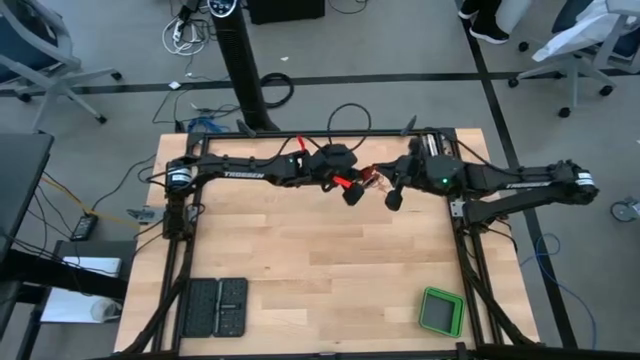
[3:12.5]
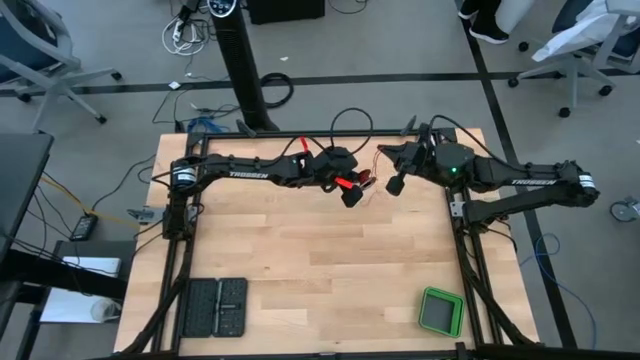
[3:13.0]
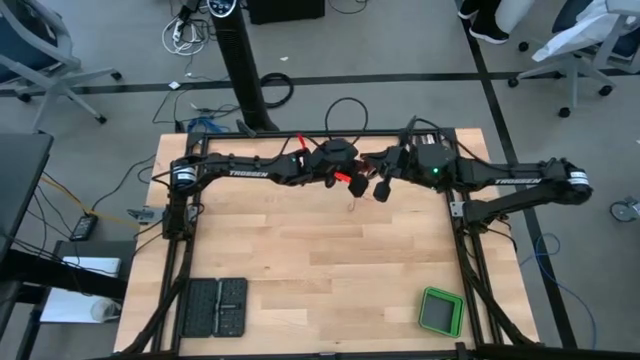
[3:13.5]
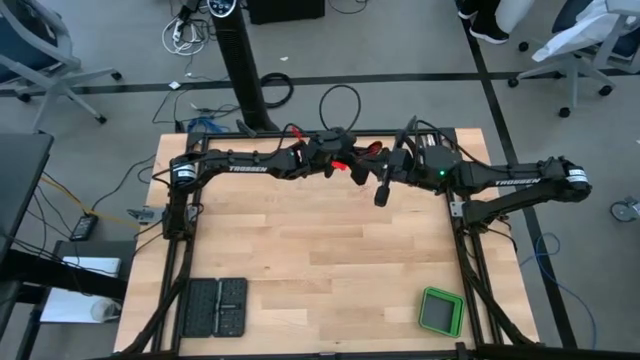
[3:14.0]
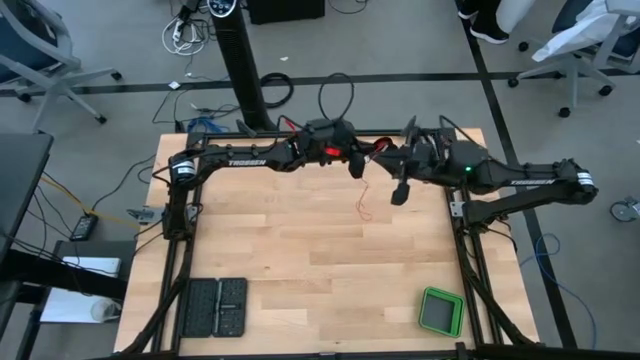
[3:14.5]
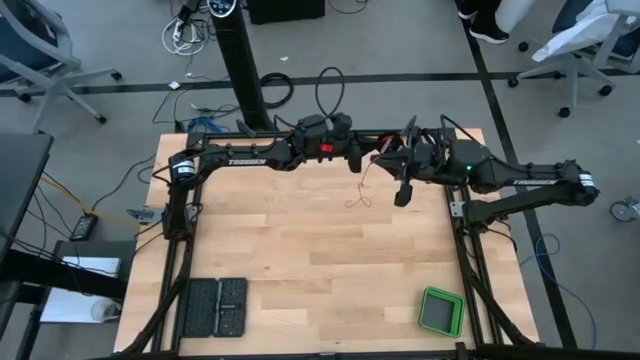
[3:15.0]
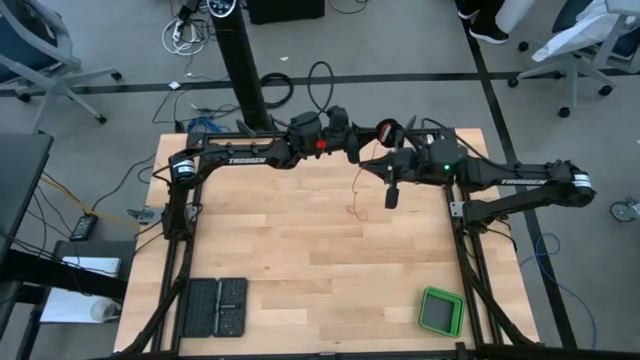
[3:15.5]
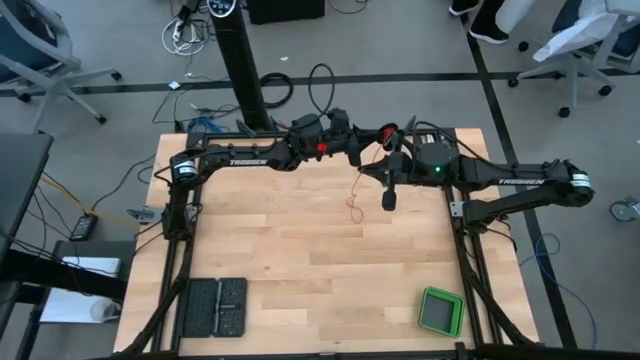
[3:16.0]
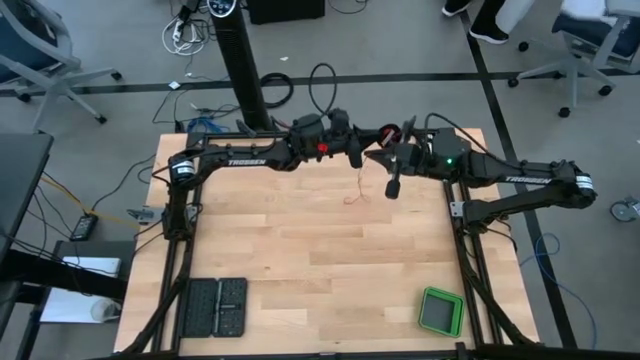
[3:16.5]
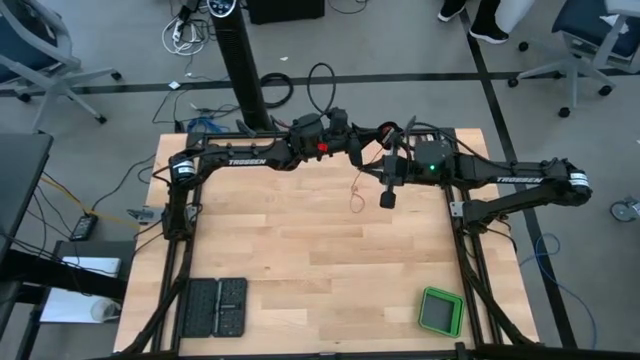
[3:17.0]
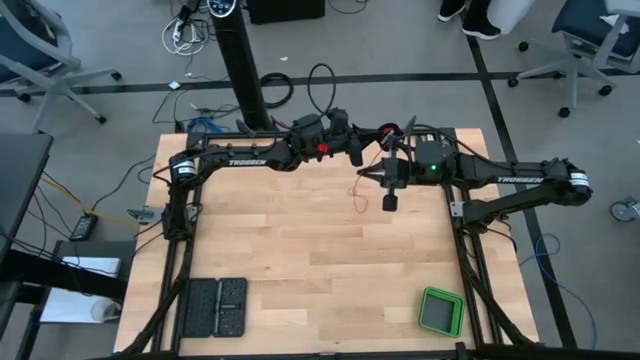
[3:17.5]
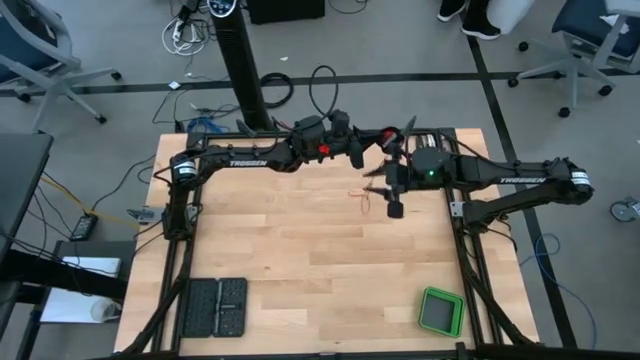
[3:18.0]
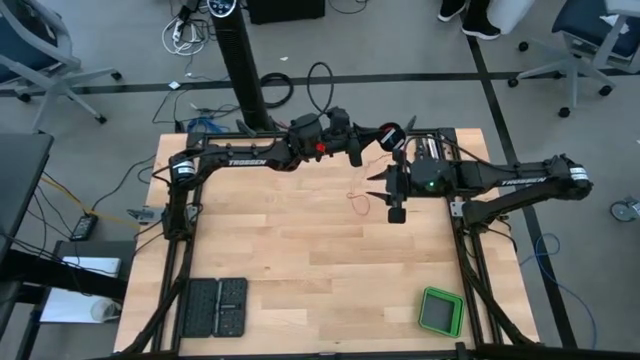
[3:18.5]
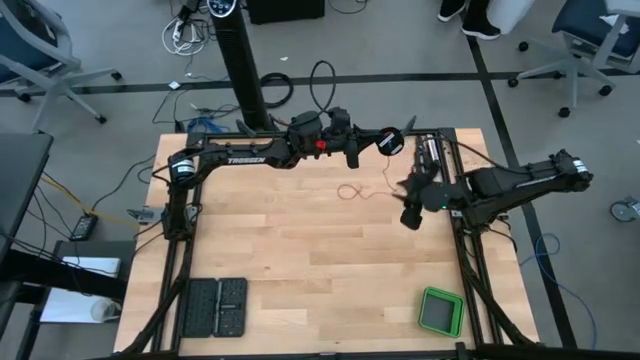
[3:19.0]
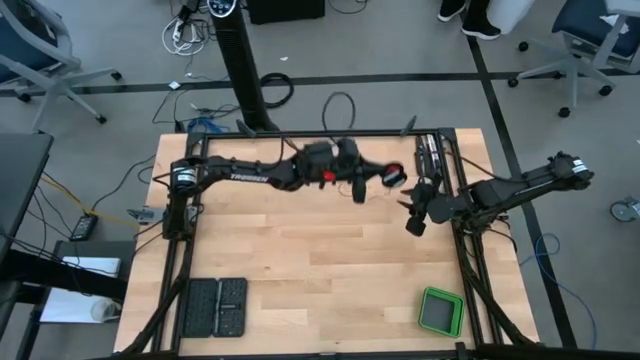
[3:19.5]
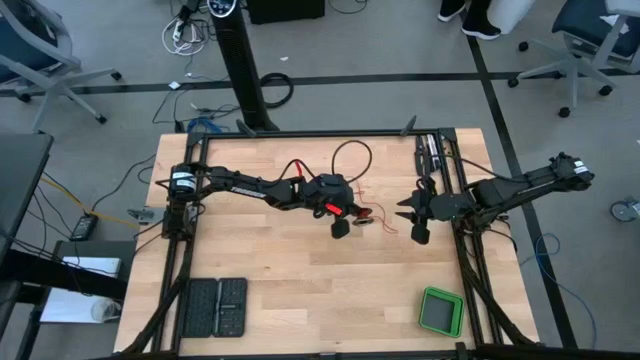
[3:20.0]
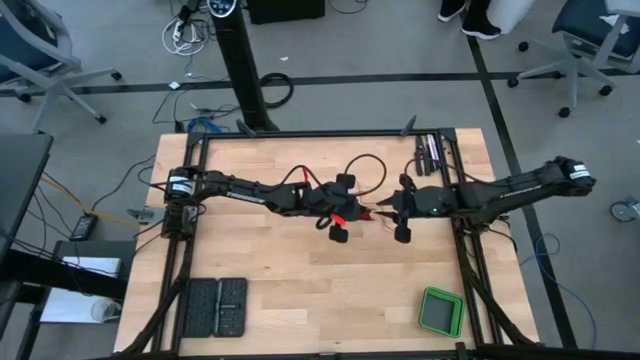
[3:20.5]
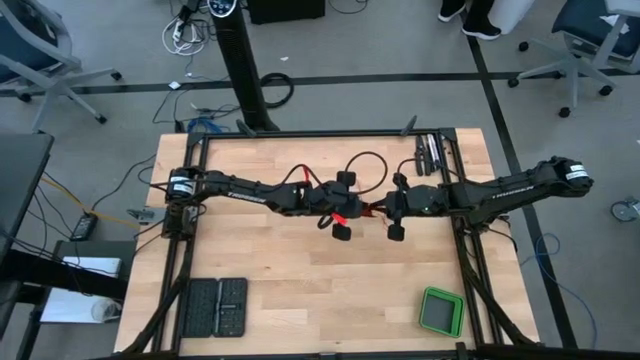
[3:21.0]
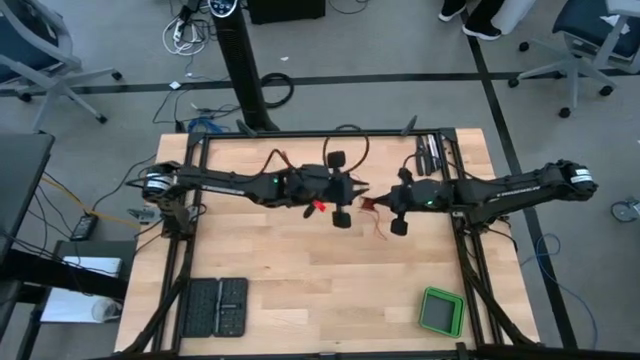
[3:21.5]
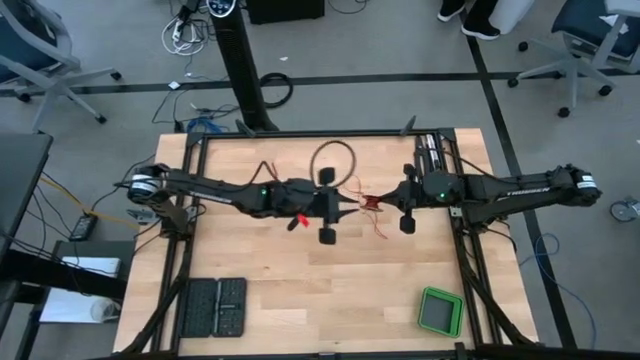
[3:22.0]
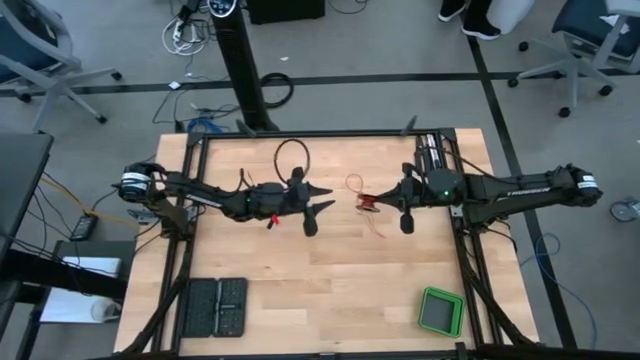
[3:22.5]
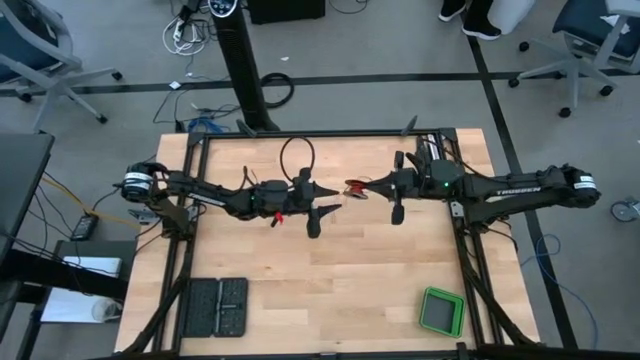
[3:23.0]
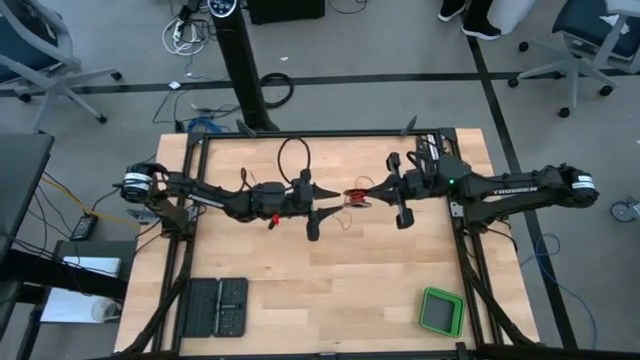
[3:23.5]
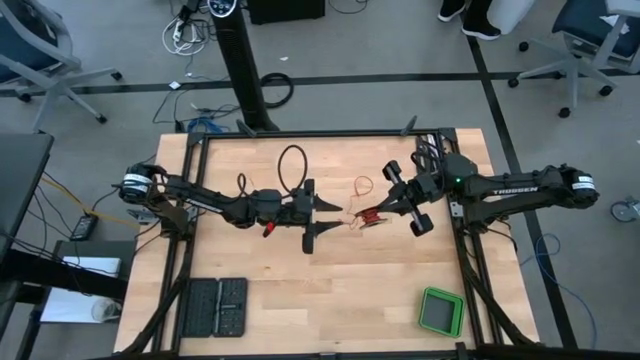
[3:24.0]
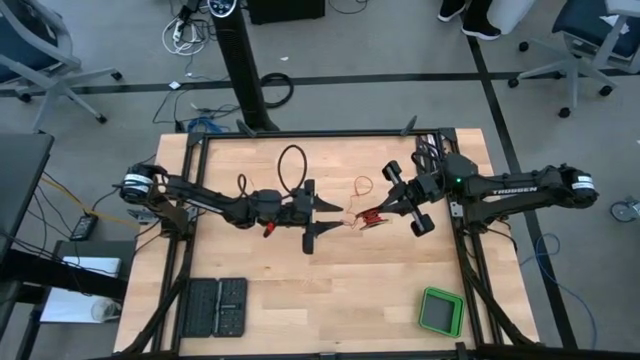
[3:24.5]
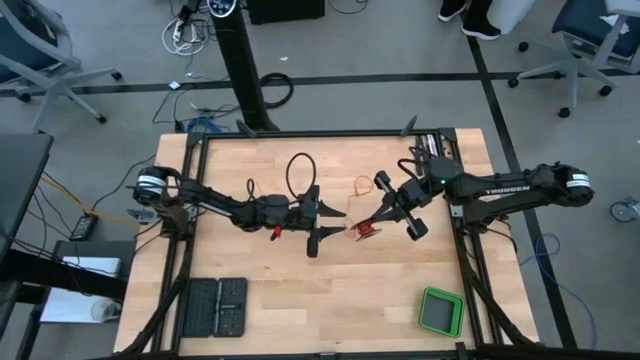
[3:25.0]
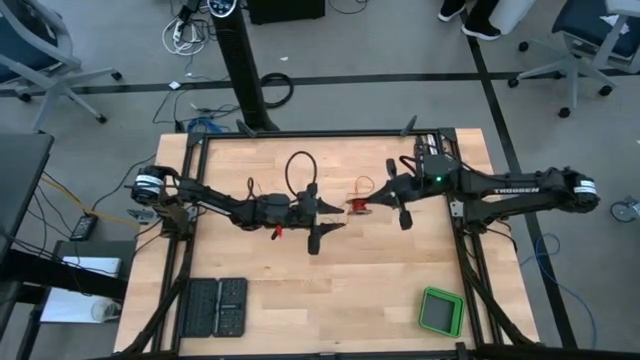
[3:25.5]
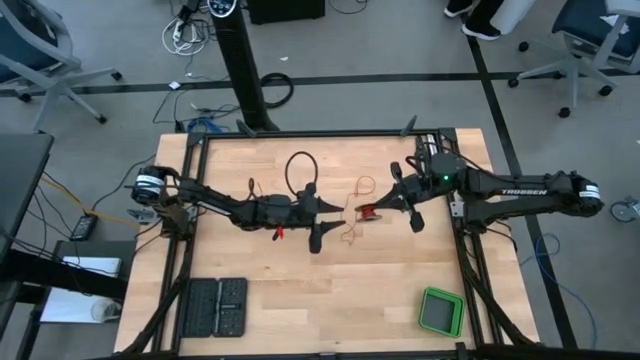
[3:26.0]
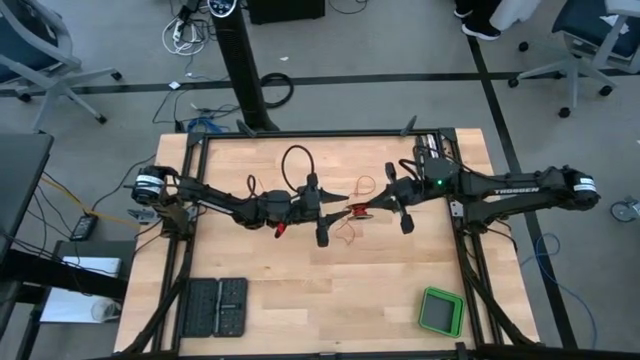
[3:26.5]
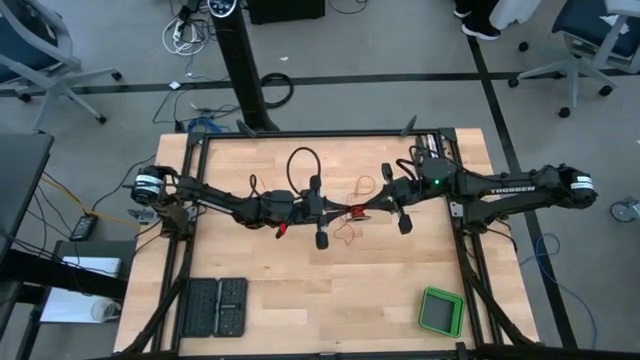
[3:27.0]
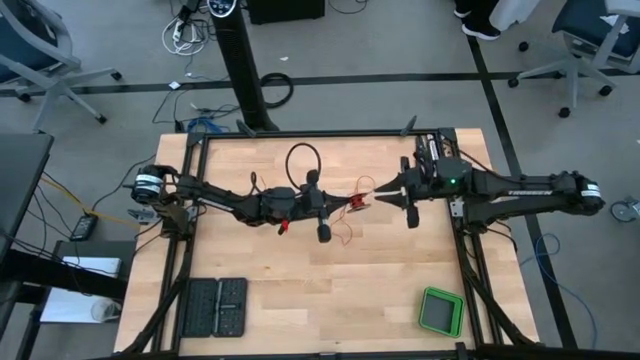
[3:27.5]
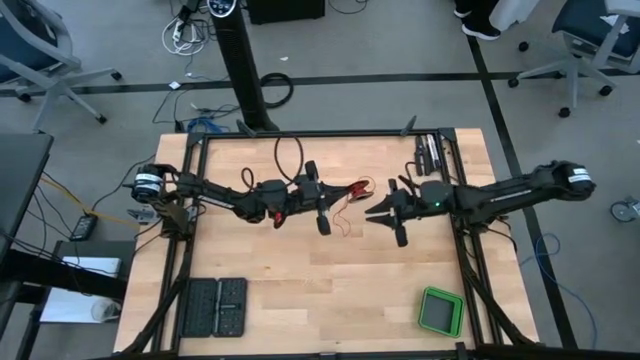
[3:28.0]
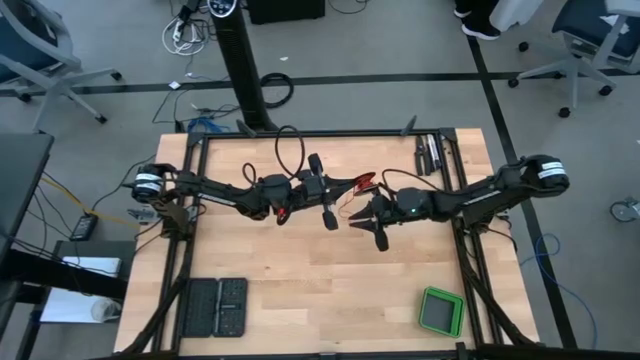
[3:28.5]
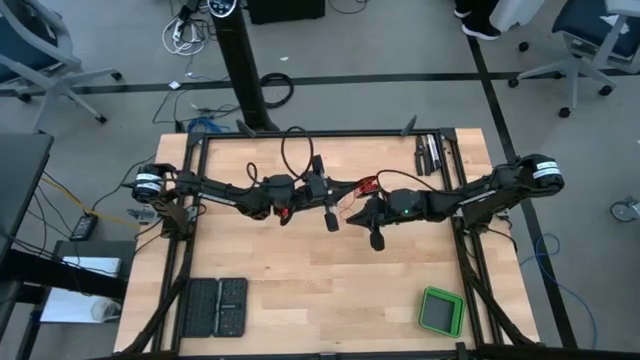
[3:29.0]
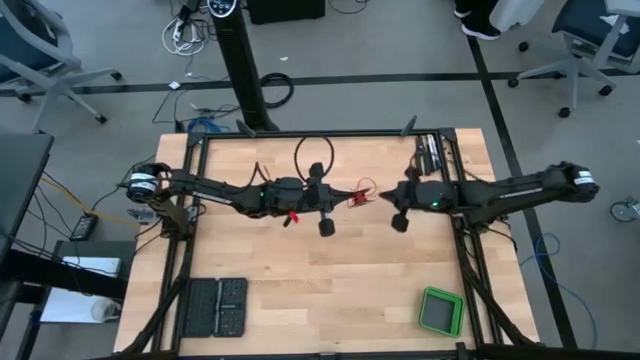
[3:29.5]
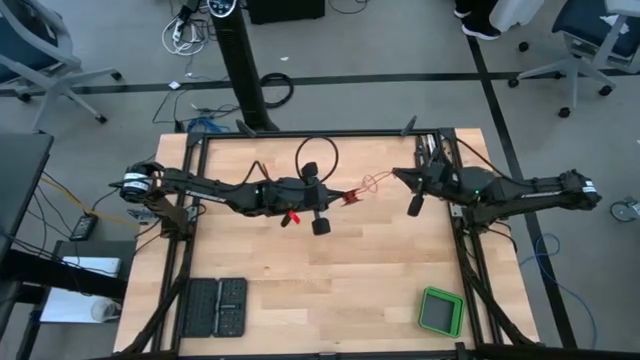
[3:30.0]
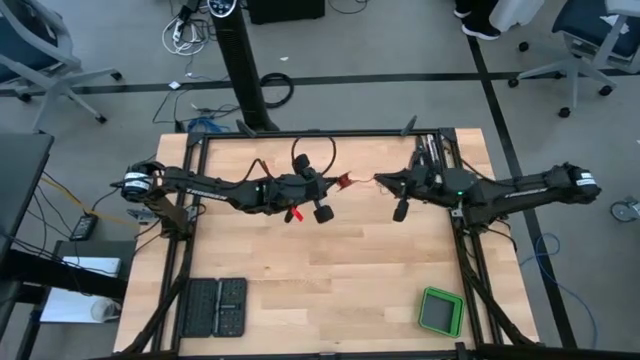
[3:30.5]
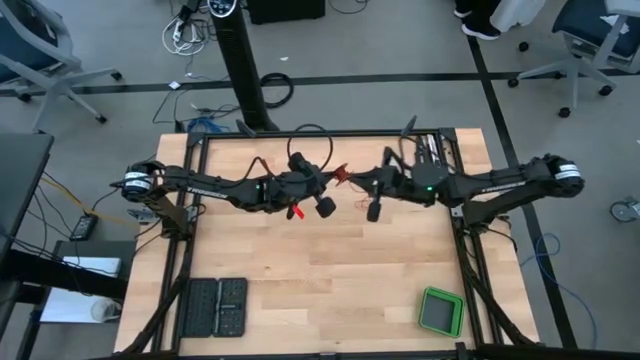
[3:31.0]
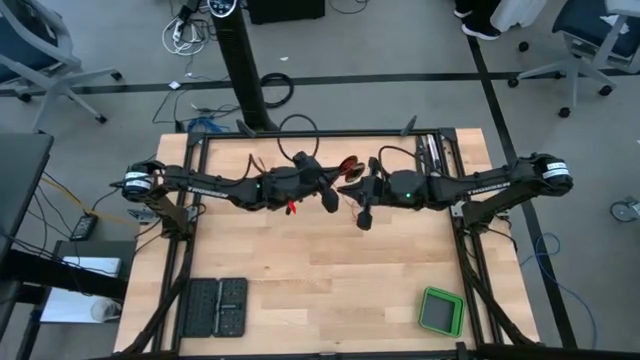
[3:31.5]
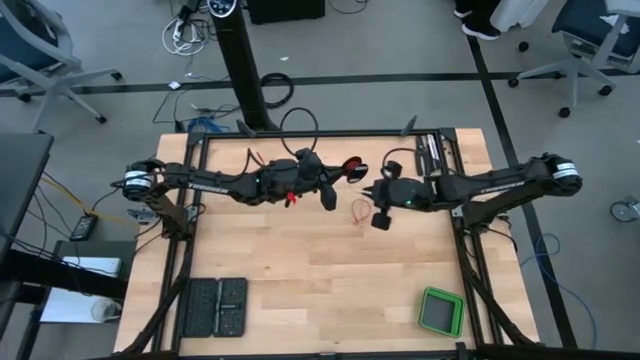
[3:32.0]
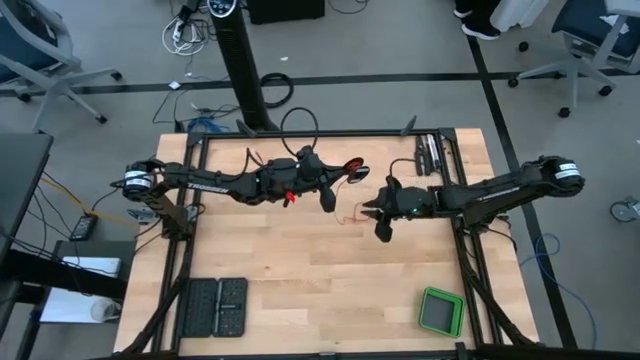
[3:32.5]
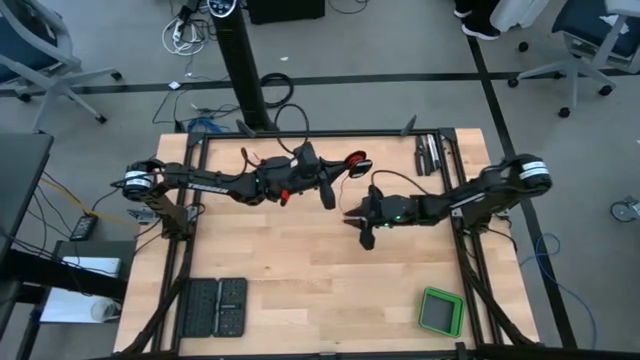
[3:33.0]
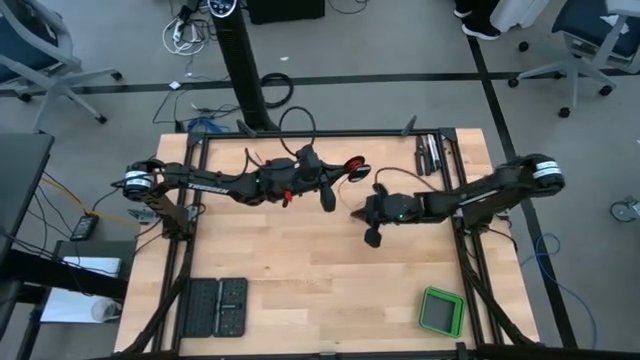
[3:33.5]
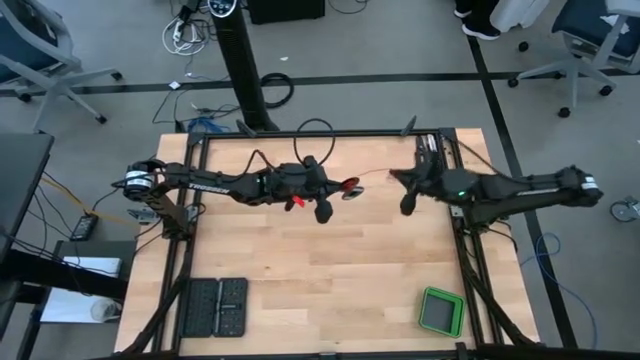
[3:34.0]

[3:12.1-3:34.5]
Task: Coil cords
Coil the red wire cable onto the black spool
